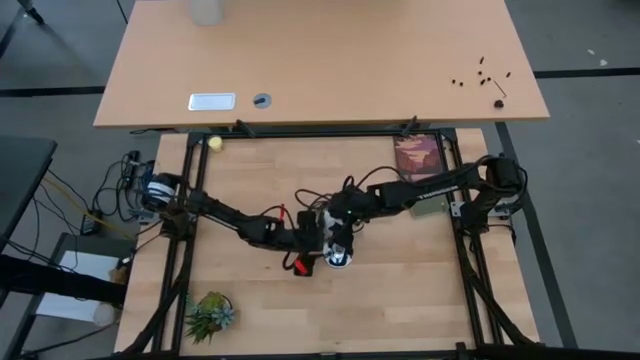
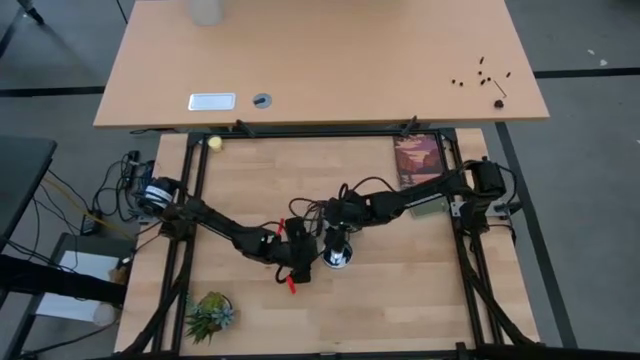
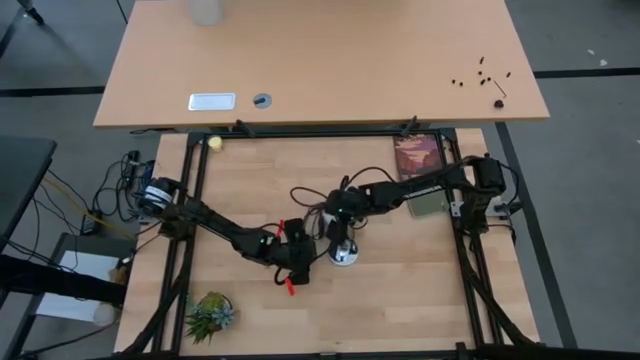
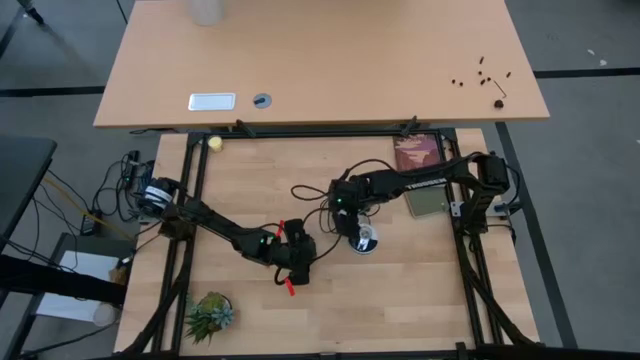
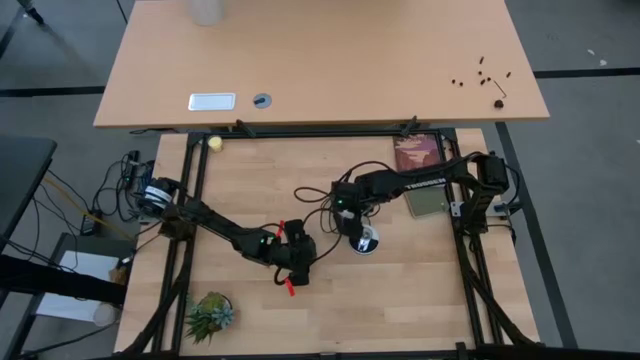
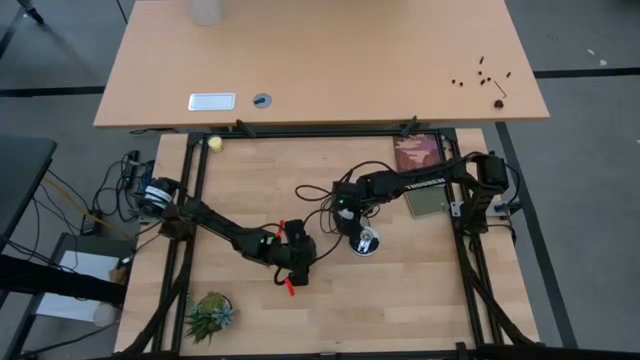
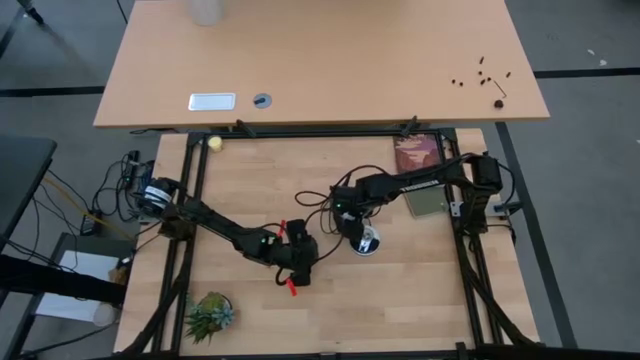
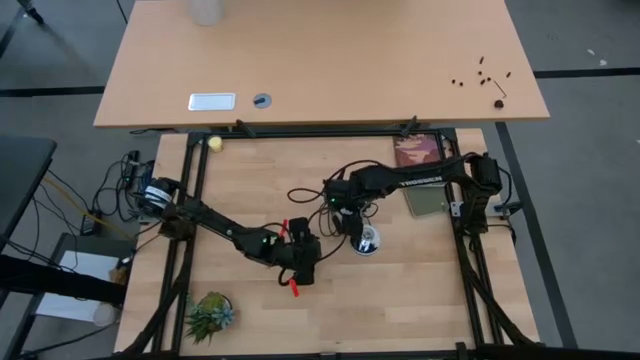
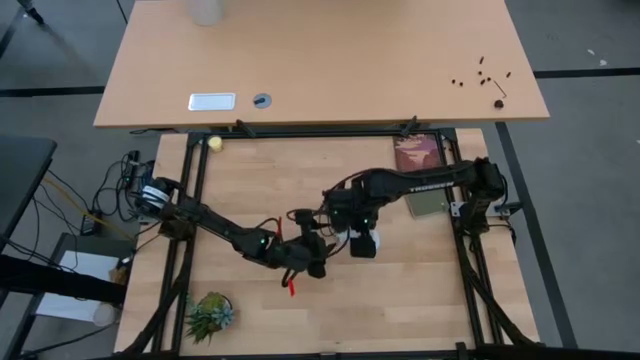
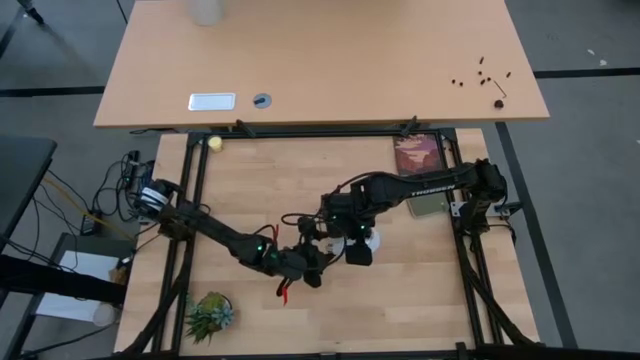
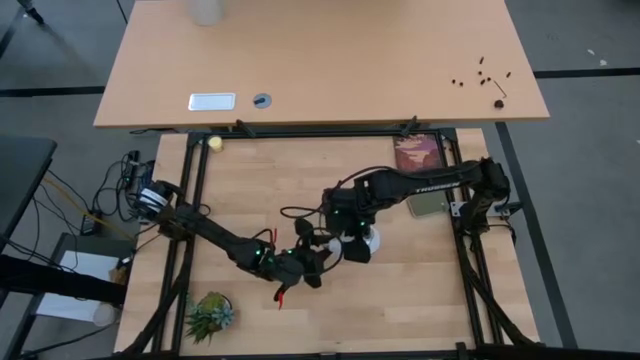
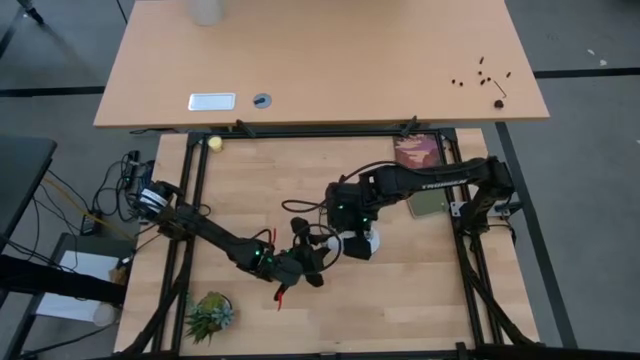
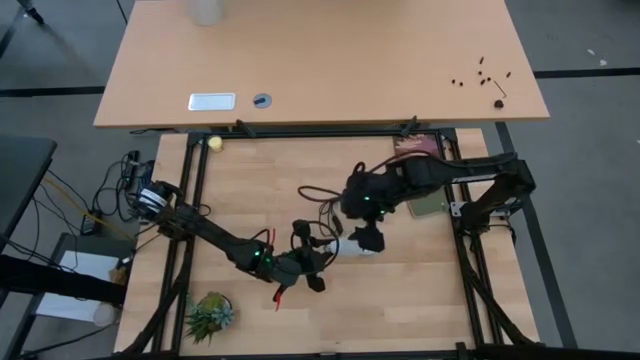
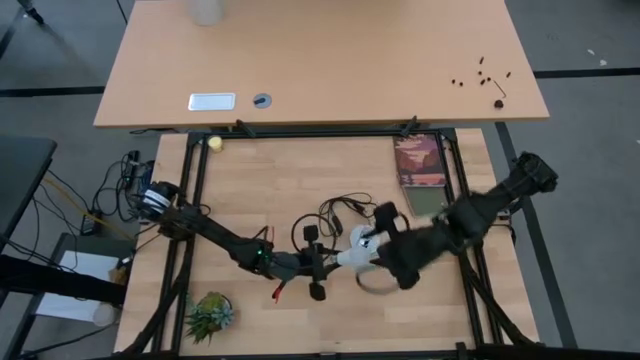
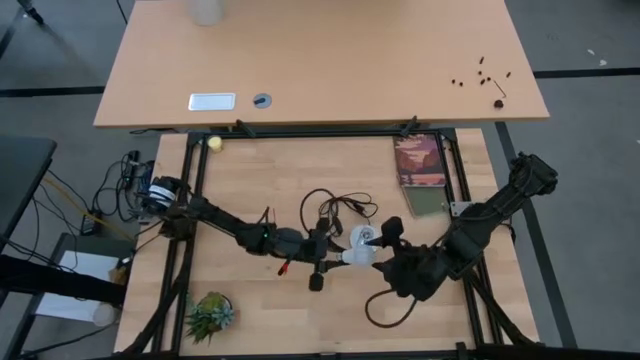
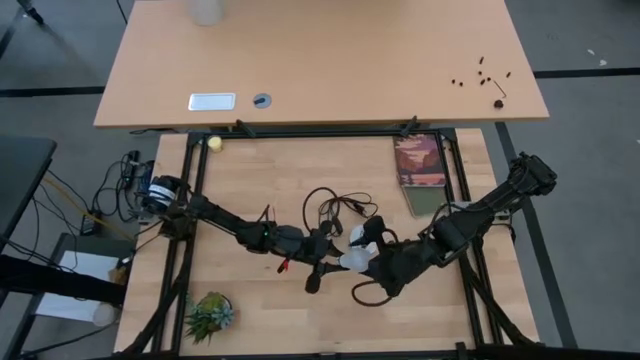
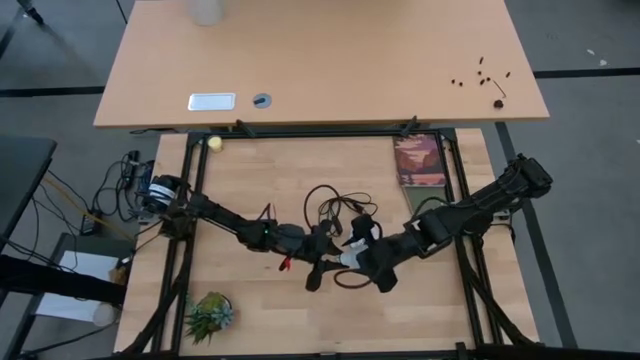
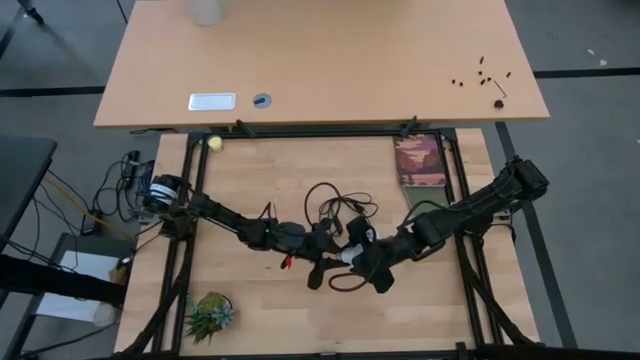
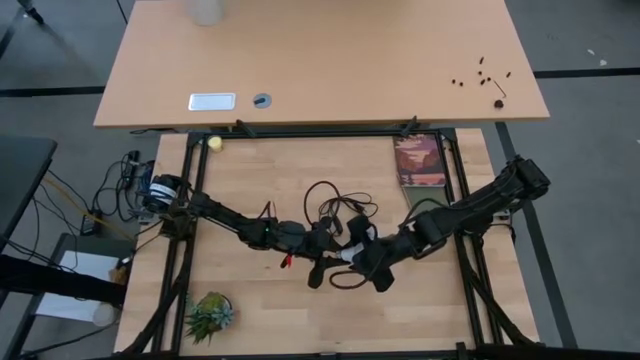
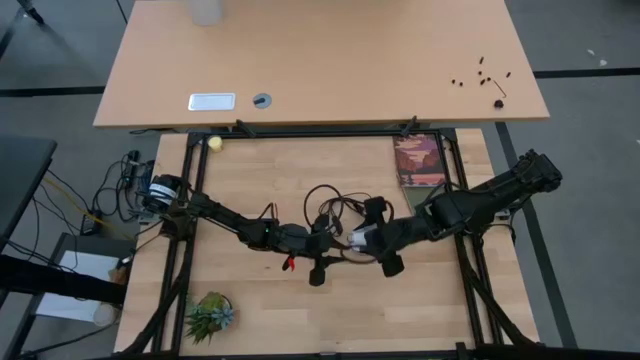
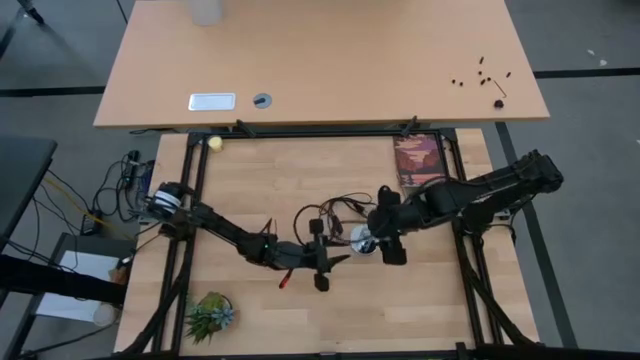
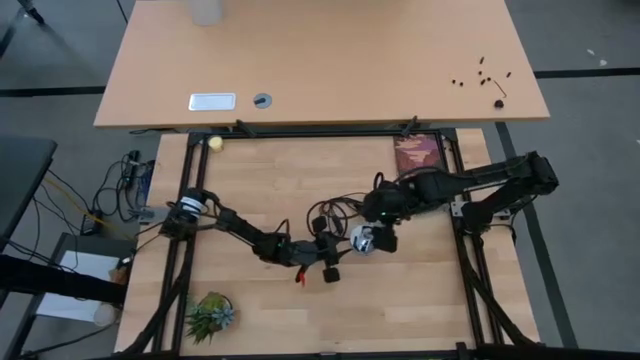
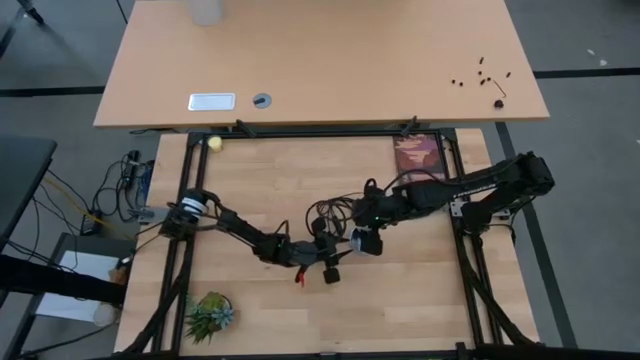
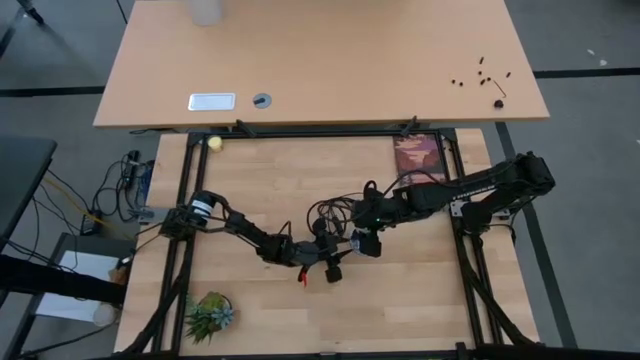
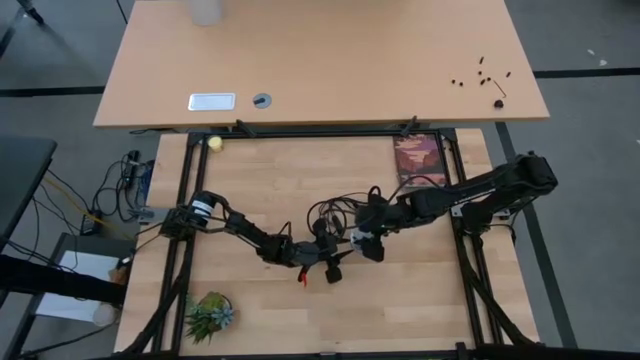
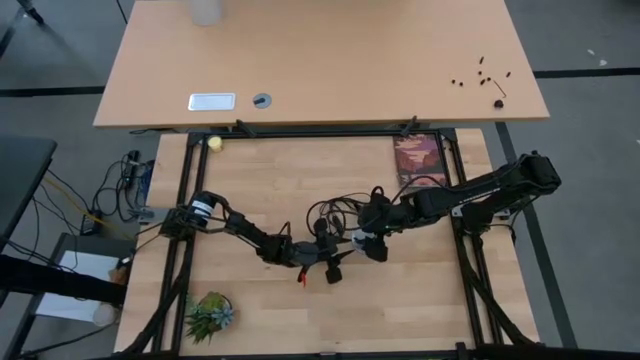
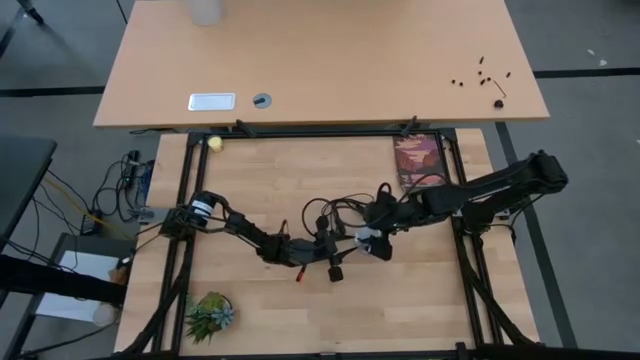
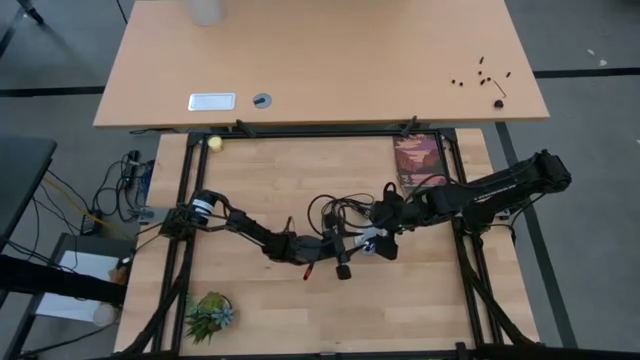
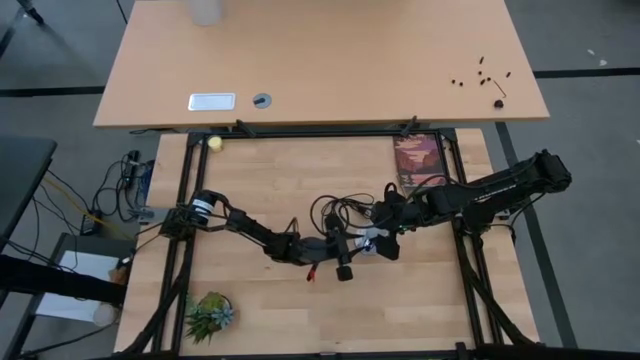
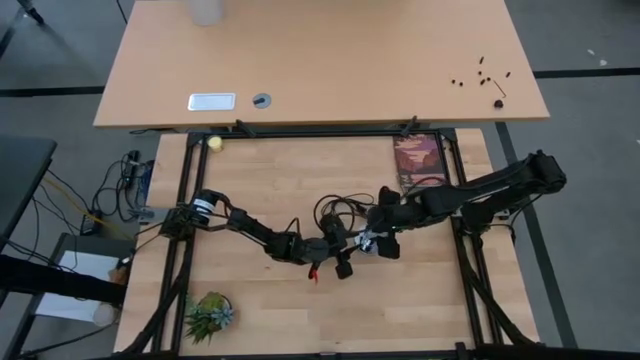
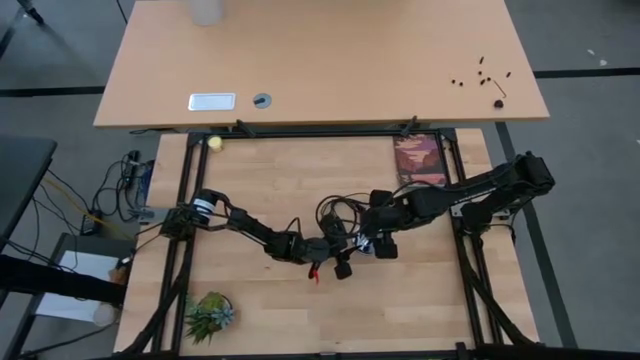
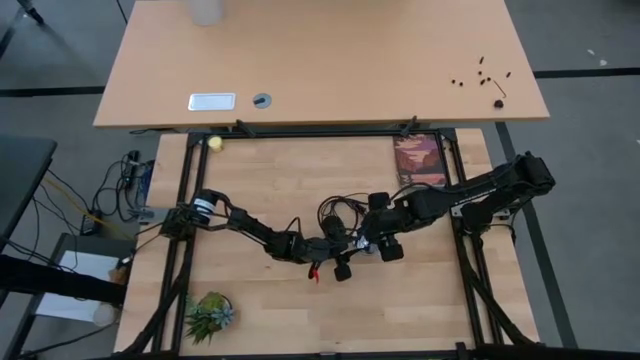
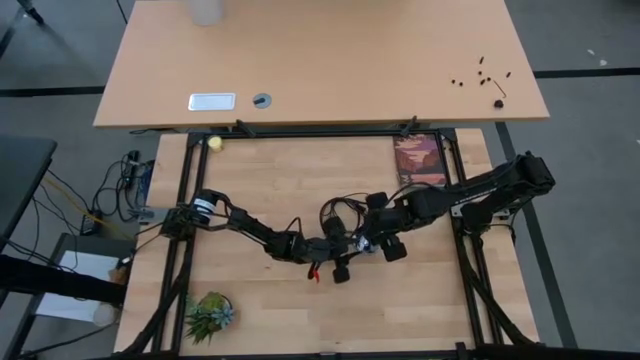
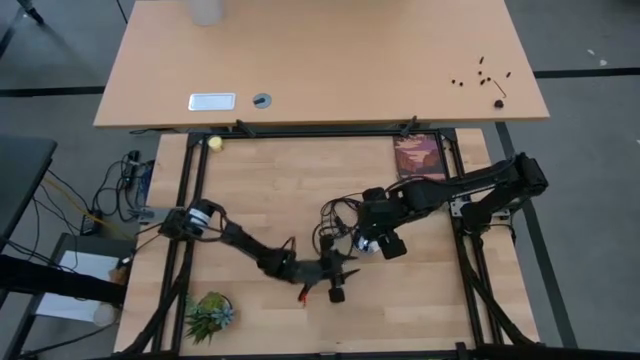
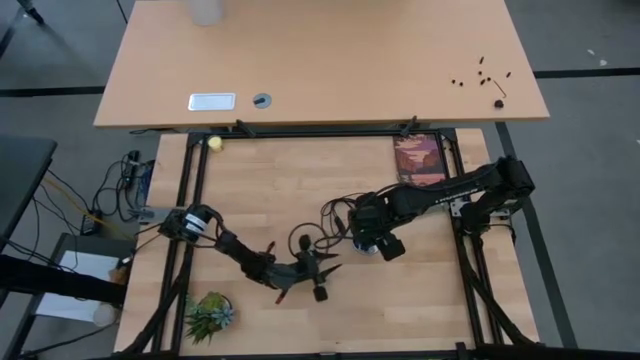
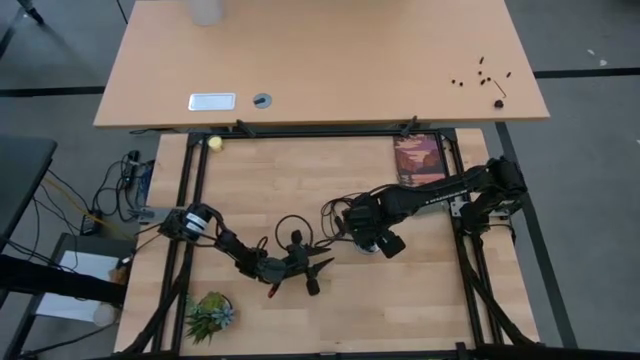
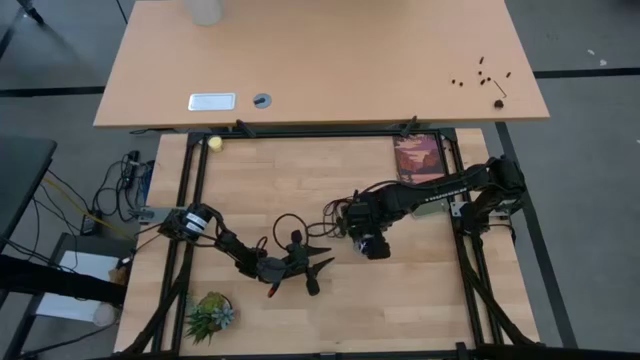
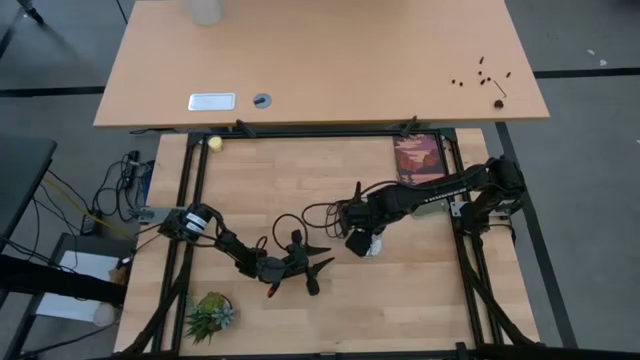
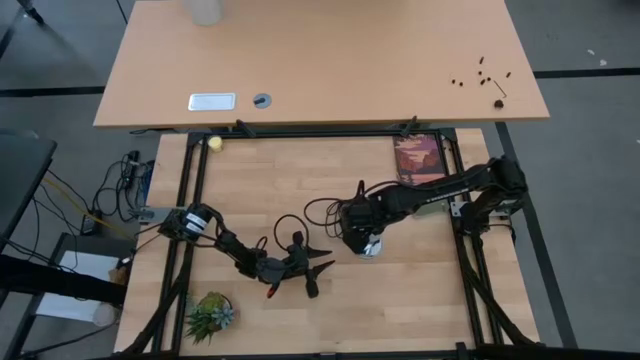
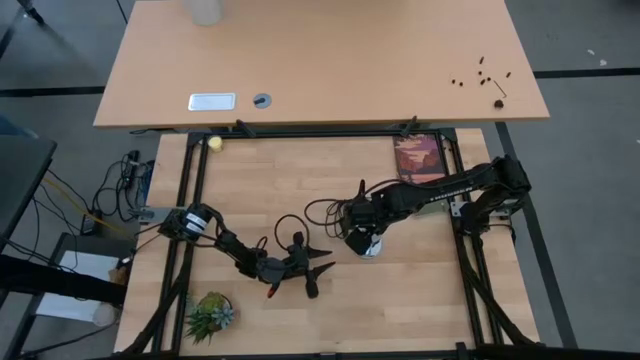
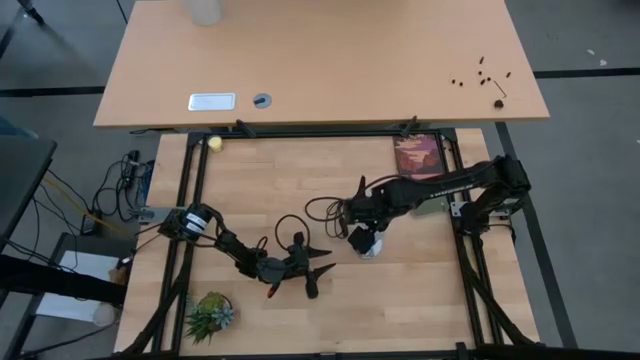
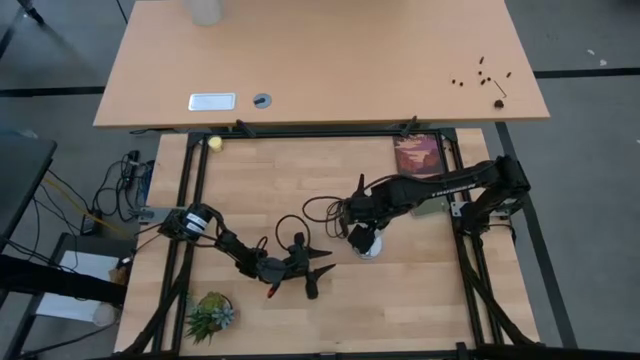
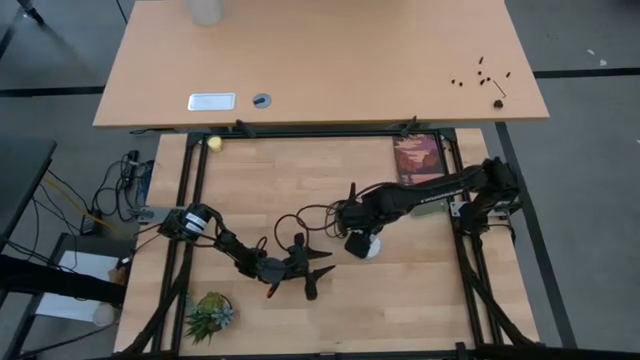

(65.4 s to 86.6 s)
Task: Screw lightbulb
Insert the lightbulb into the silver lamp
